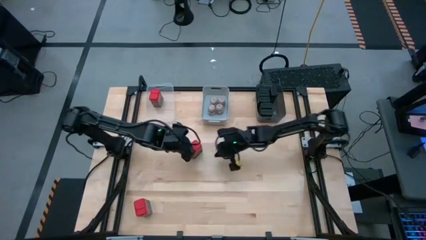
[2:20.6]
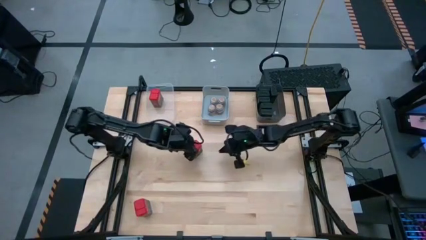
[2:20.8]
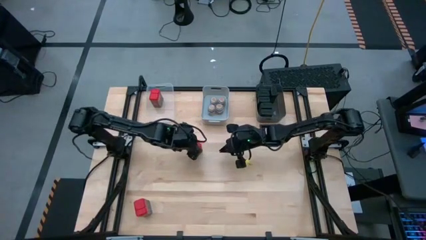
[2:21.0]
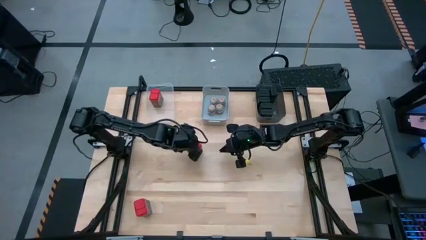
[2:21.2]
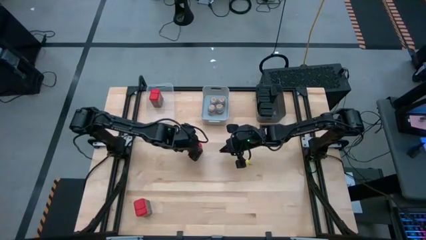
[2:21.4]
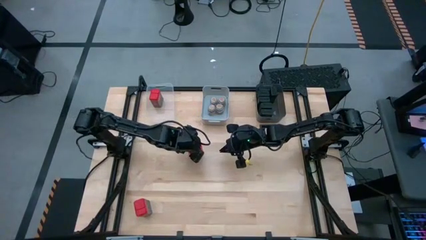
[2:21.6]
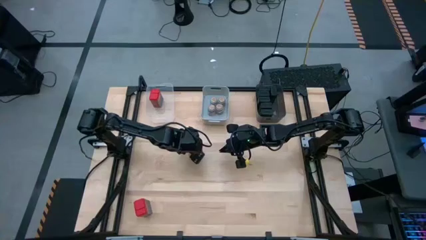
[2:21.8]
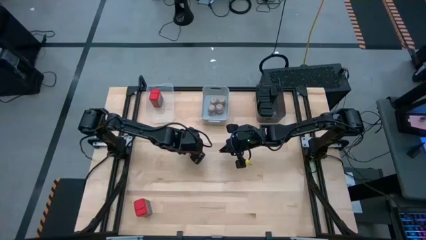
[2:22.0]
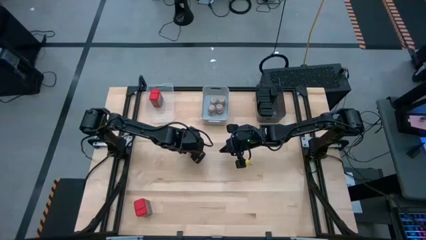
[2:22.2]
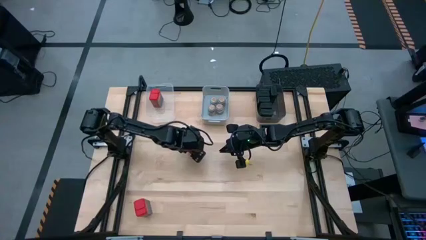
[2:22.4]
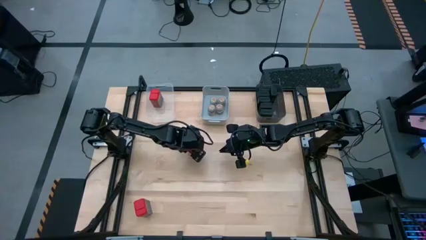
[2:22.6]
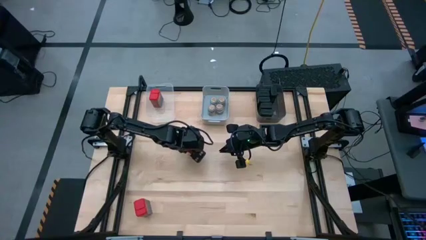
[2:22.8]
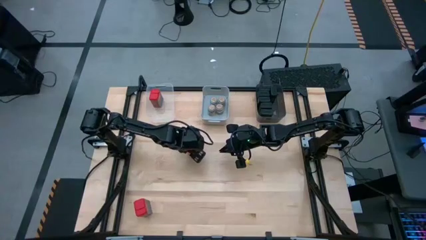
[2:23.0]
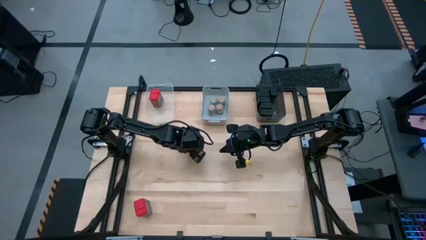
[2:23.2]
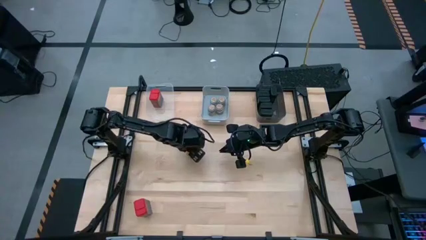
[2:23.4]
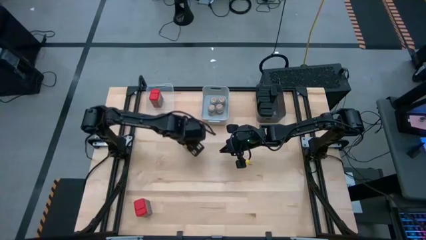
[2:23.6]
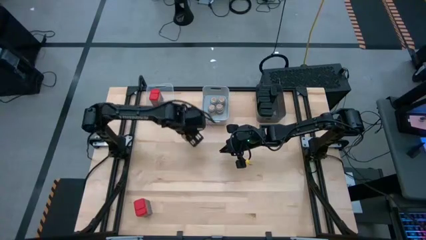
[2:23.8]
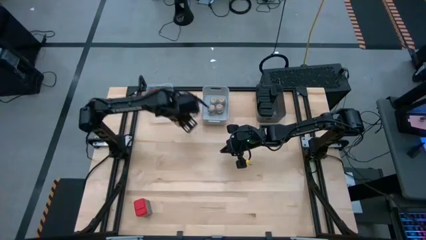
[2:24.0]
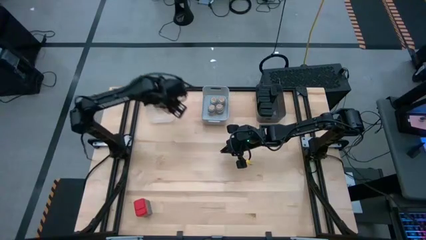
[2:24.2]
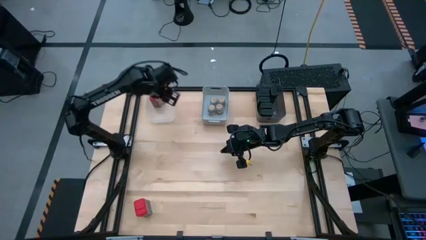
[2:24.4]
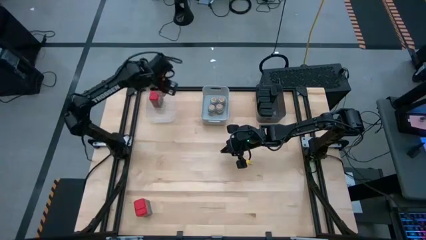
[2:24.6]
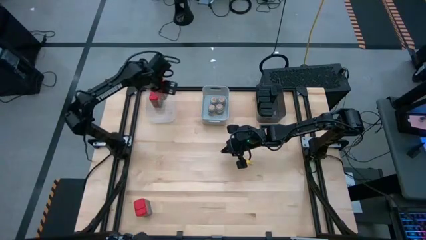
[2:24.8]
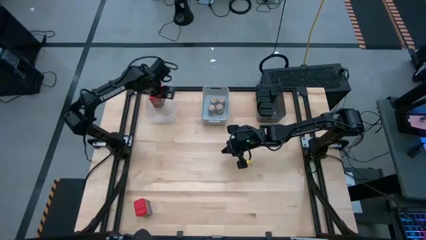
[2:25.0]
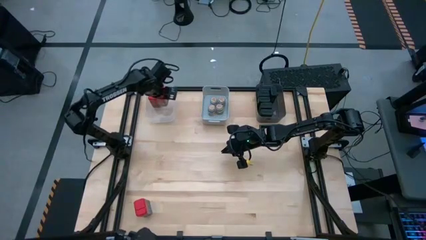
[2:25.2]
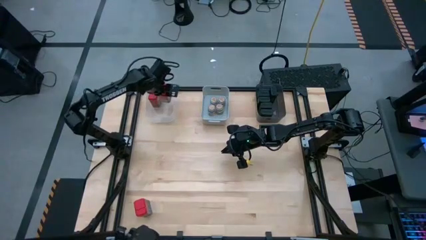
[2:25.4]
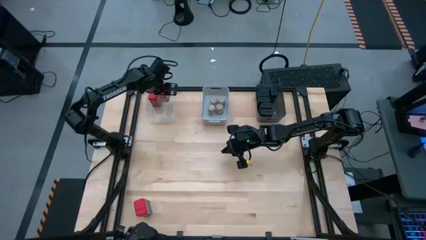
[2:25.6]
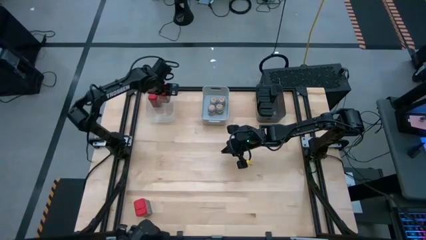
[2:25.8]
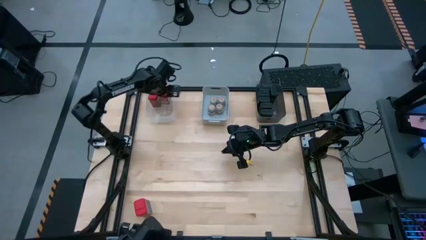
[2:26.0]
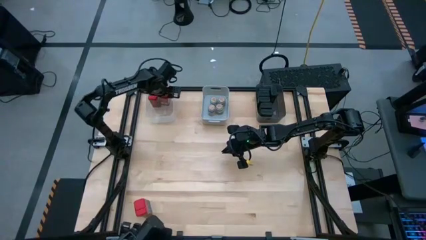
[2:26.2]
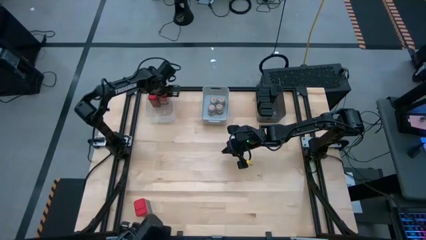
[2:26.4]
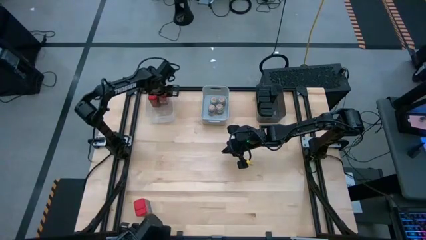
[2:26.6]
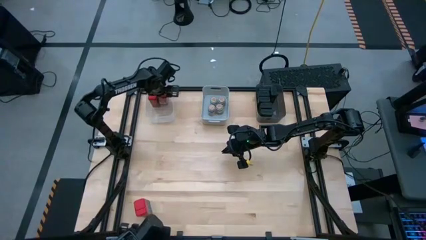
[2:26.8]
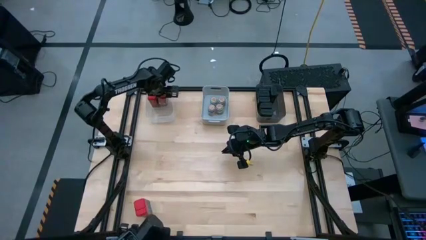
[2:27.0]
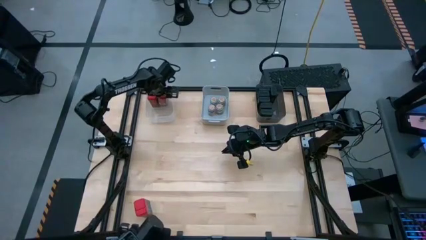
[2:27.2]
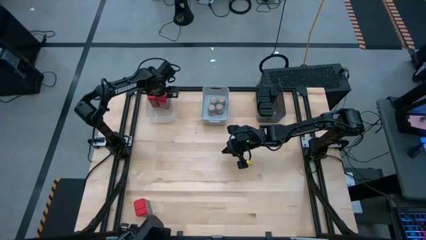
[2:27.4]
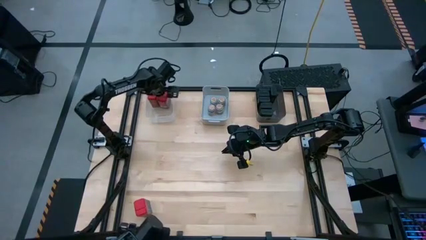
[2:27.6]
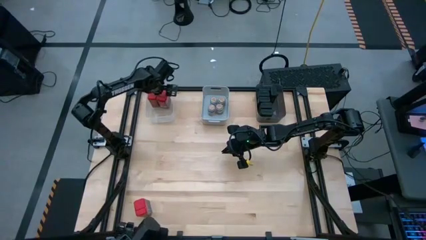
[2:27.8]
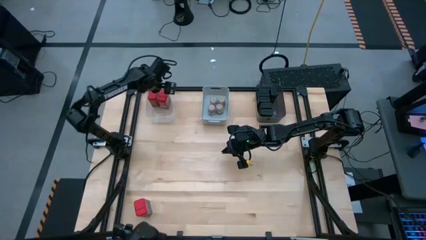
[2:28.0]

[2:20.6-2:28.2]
Task: Sort spices by type
Put the right red seasoning can into the transparent bin

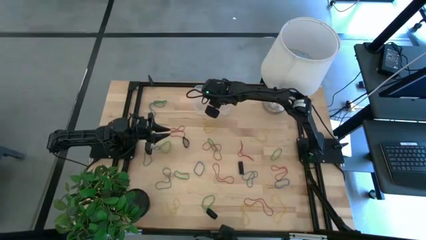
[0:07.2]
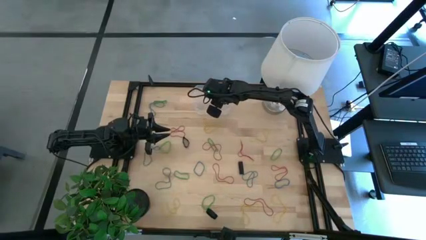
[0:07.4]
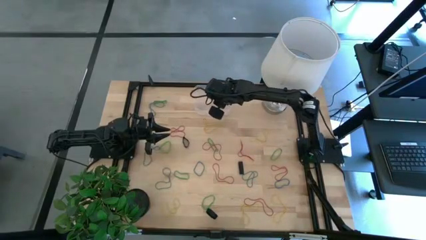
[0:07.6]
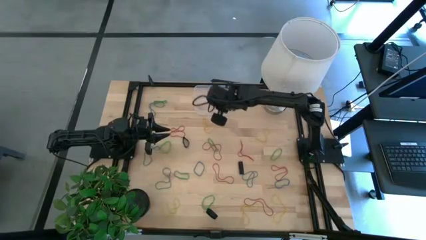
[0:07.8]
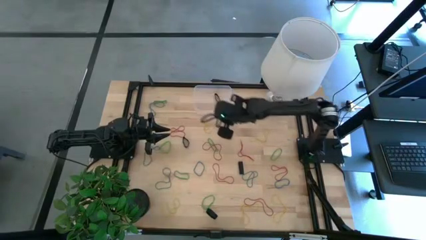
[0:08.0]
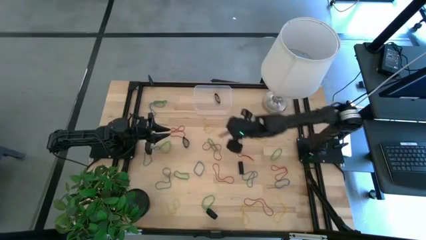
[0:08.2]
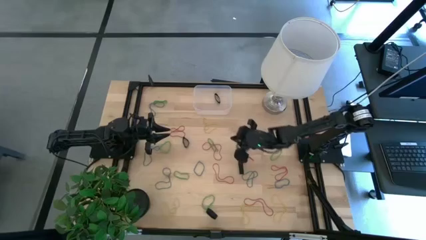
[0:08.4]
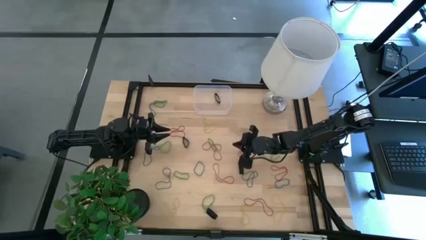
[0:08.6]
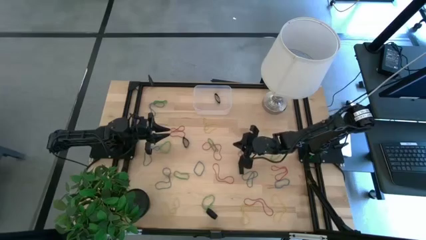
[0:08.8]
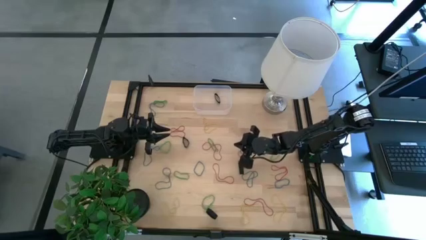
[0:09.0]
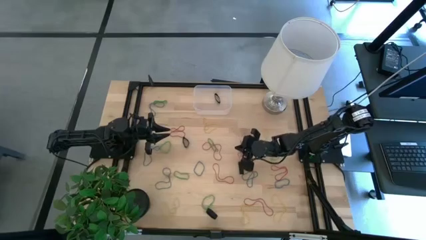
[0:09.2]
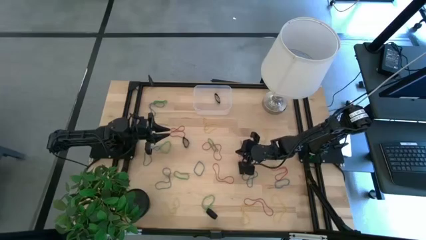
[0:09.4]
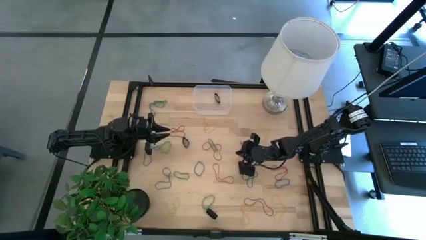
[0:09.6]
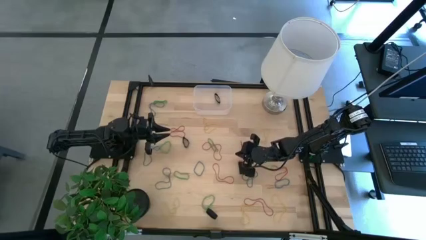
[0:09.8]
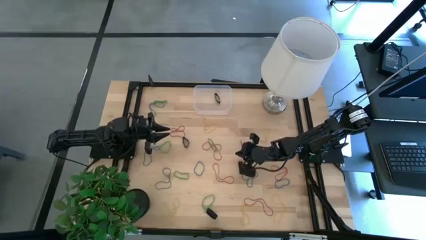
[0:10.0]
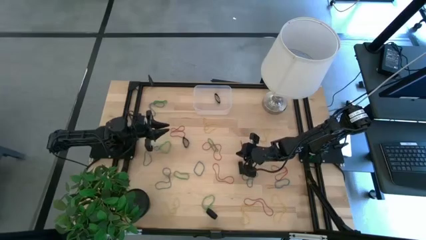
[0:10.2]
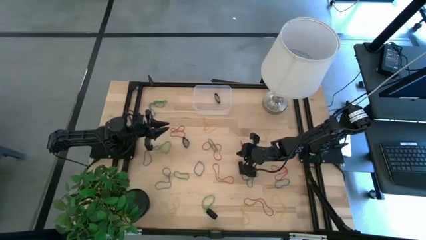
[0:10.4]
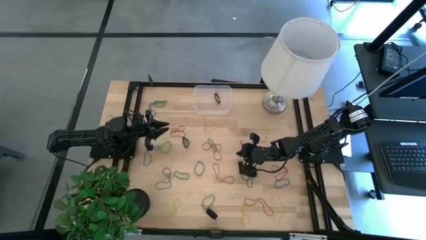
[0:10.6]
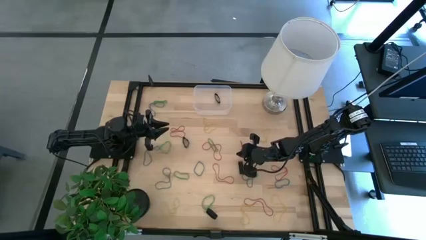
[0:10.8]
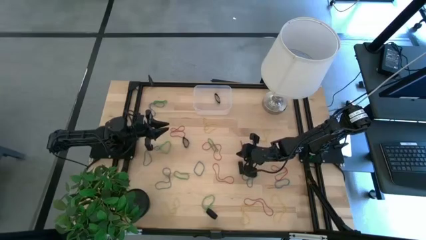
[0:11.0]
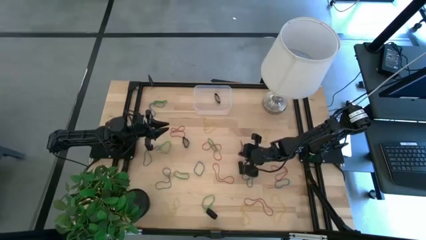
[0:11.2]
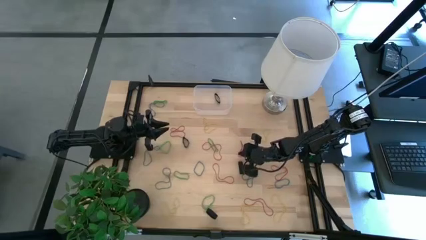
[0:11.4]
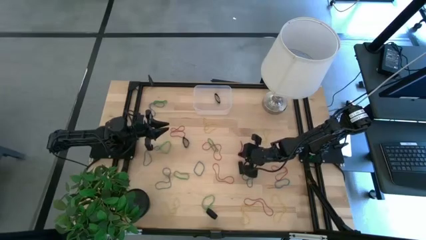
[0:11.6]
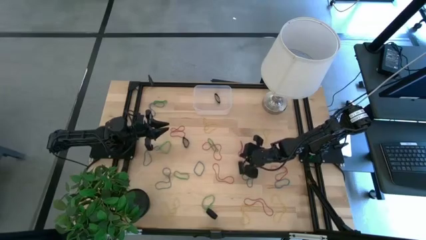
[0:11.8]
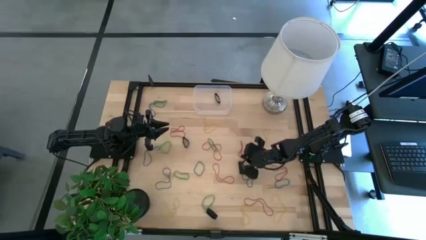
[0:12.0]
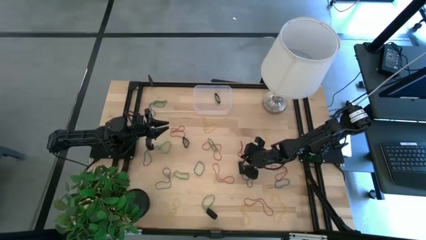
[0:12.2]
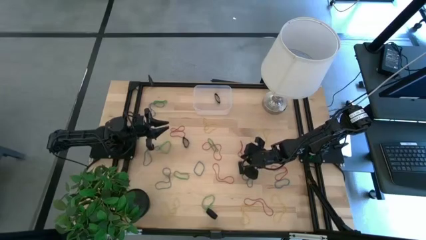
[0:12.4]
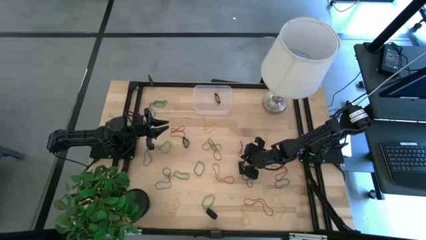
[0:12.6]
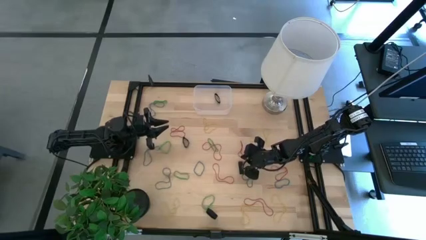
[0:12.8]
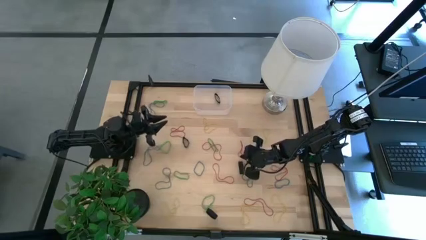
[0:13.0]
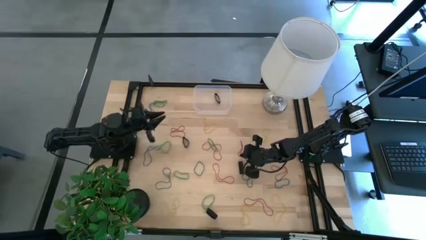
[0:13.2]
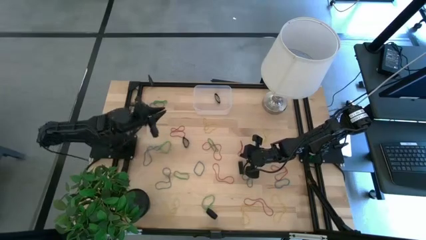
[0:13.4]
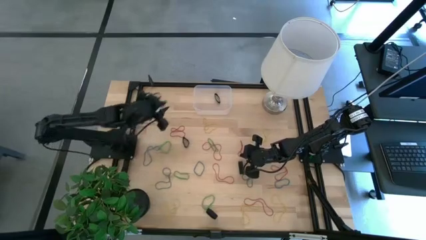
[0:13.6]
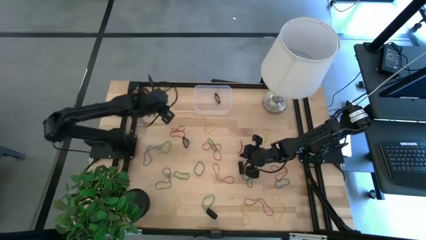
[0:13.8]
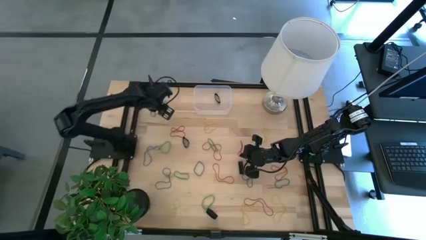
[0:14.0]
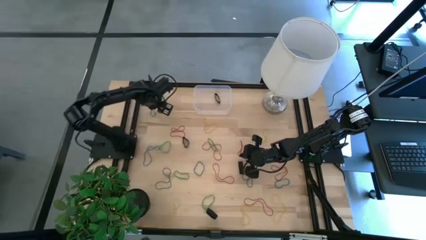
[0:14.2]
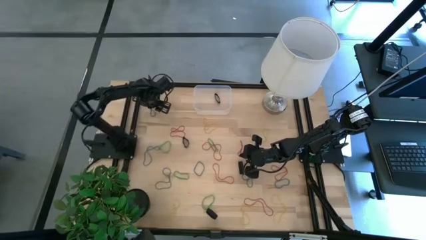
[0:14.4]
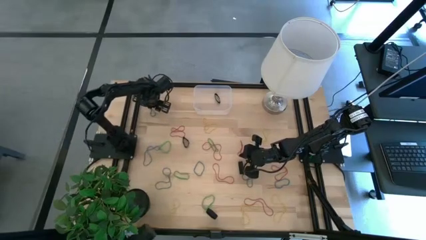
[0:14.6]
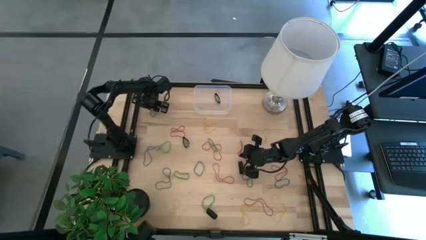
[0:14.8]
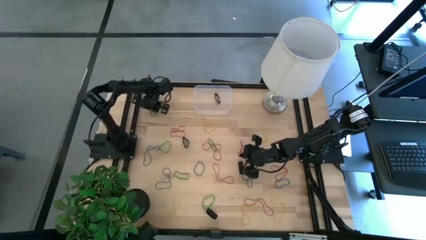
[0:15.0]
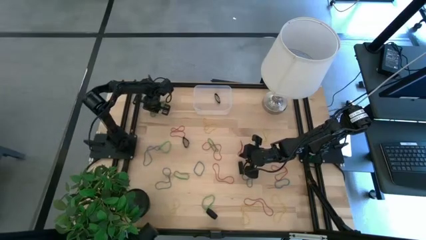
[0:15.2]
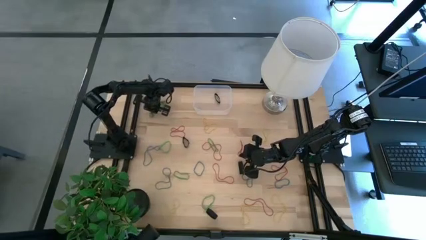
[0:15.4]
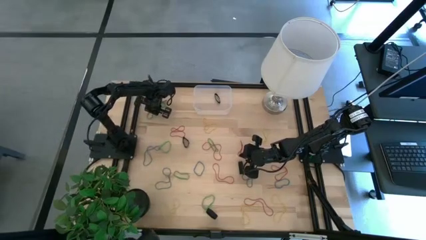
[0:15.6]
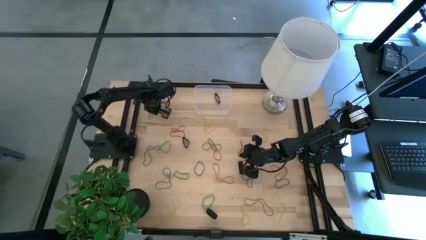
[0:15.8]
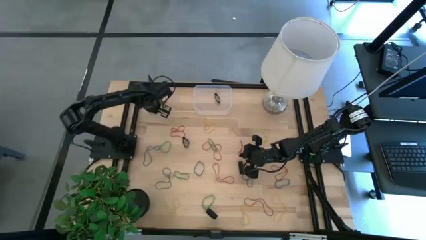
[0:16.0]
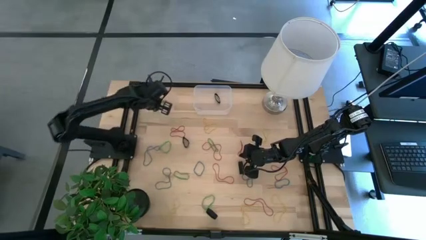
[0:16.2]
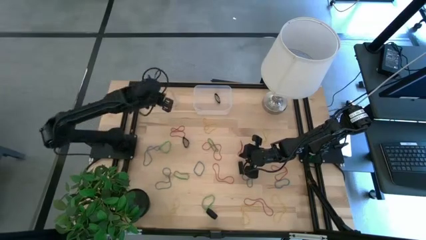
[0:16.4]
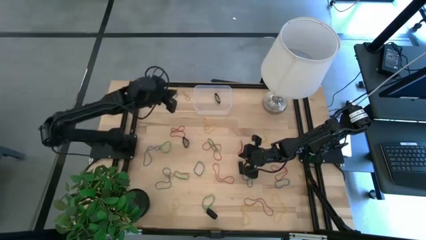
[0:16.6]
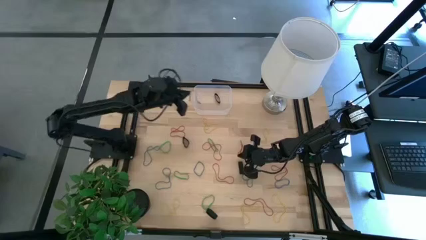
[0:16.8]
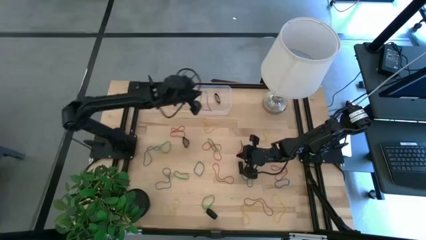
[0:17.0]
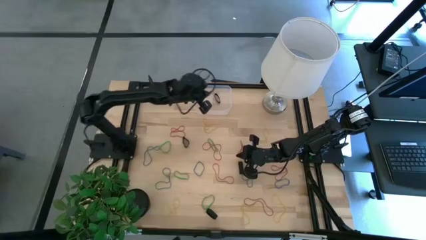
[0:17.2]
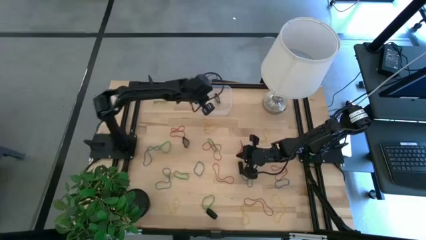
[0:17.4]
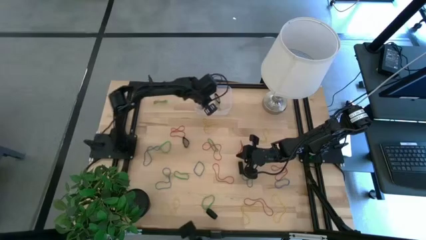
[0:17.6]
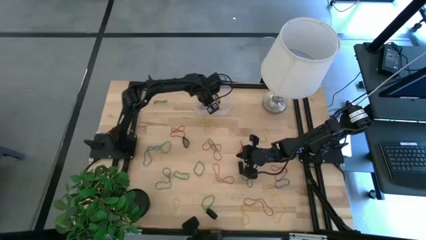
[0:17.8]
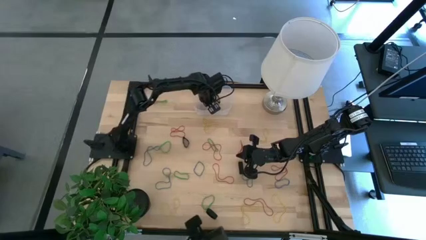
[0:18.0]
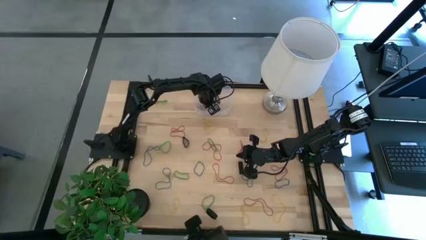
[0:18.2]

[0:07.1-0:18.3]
Task: Pick and place rubber bands into bin
Put the blue rubber band into the transparent bin
